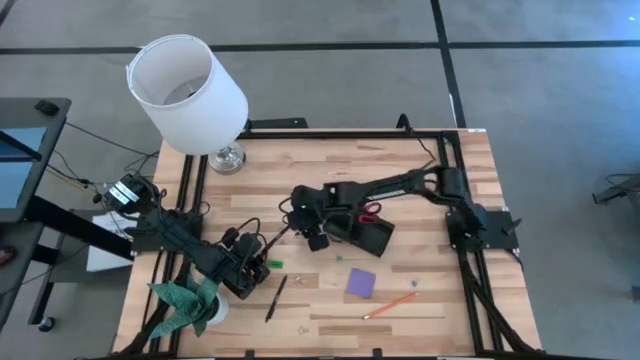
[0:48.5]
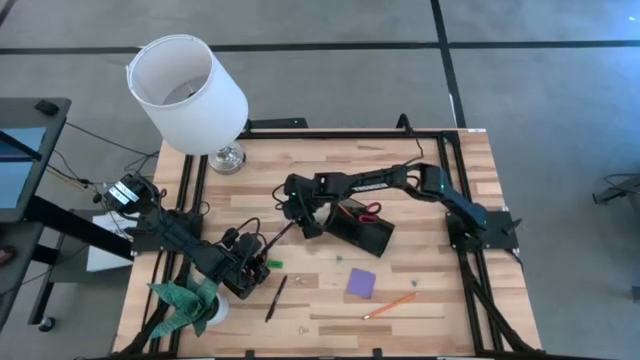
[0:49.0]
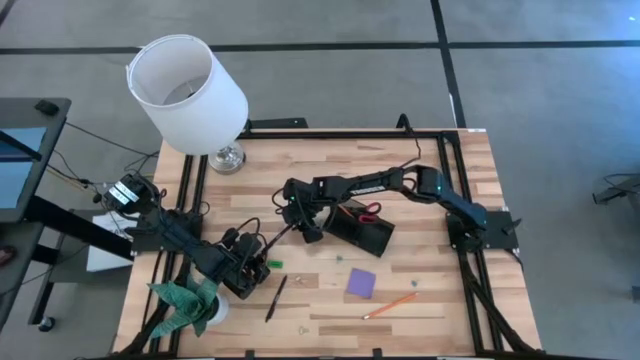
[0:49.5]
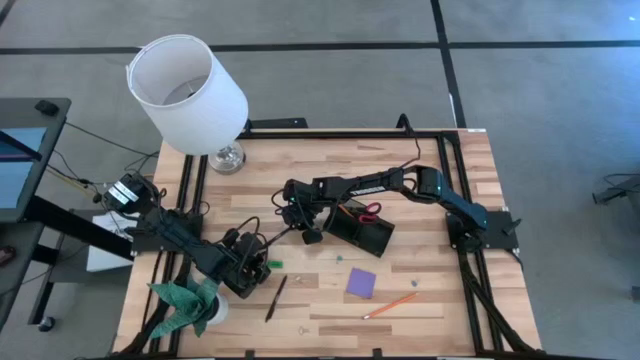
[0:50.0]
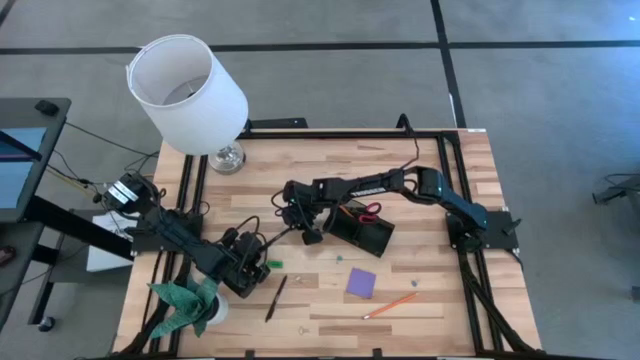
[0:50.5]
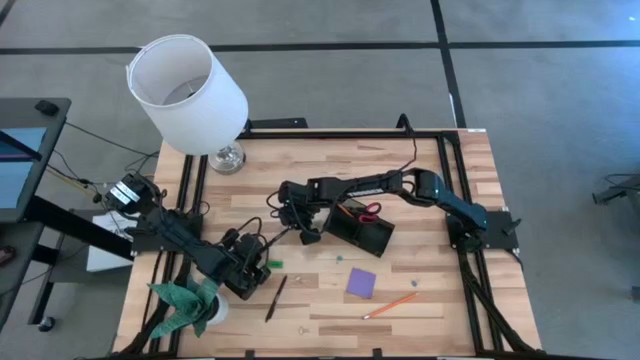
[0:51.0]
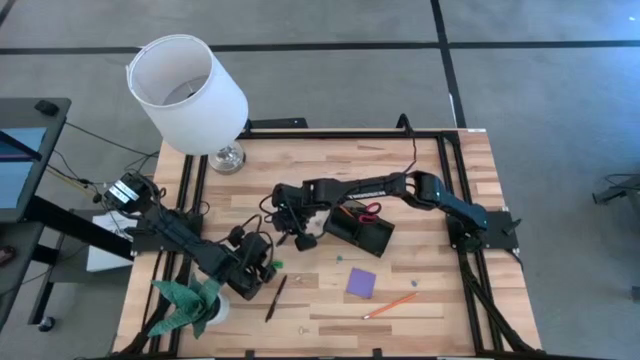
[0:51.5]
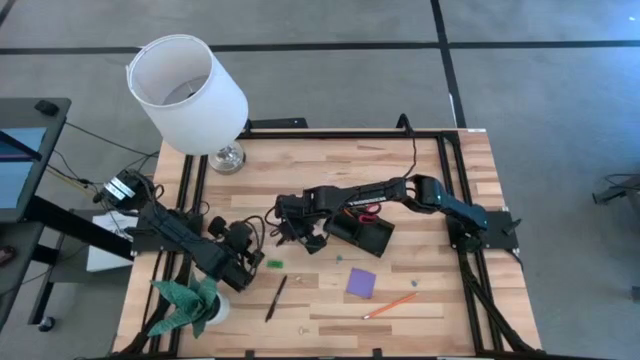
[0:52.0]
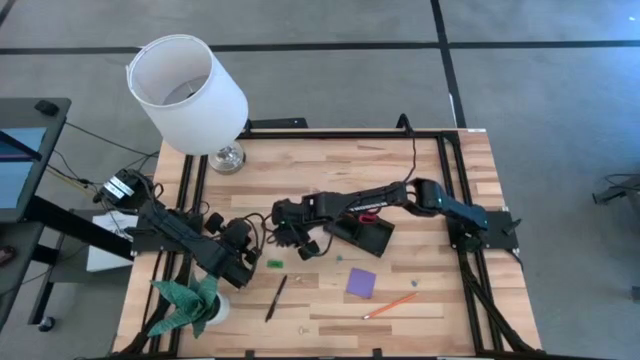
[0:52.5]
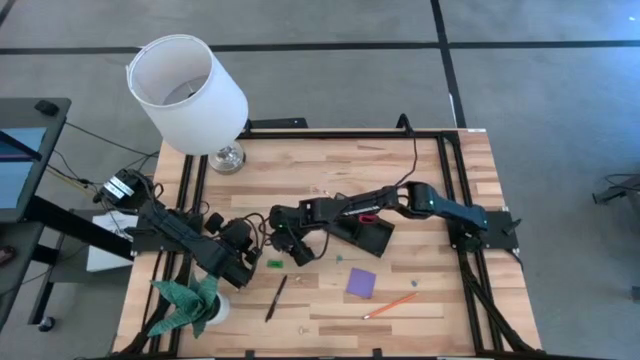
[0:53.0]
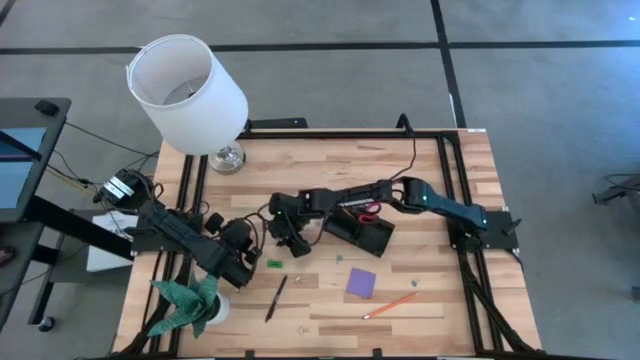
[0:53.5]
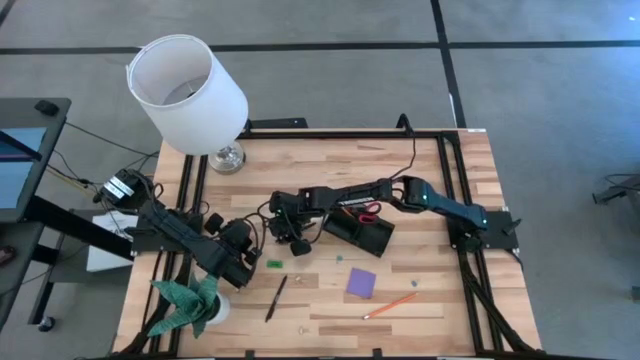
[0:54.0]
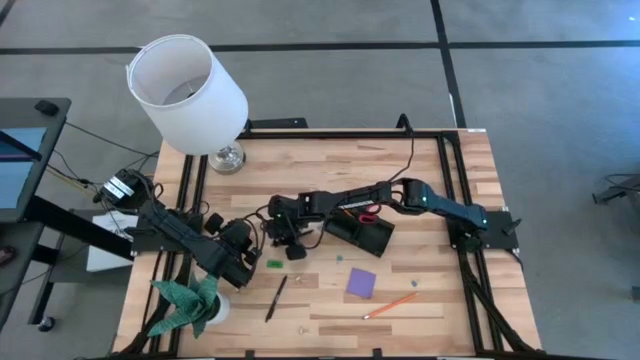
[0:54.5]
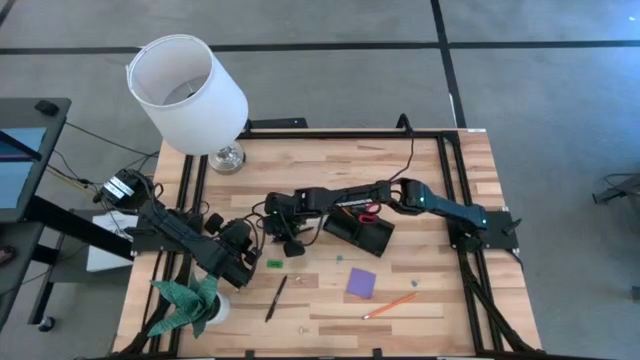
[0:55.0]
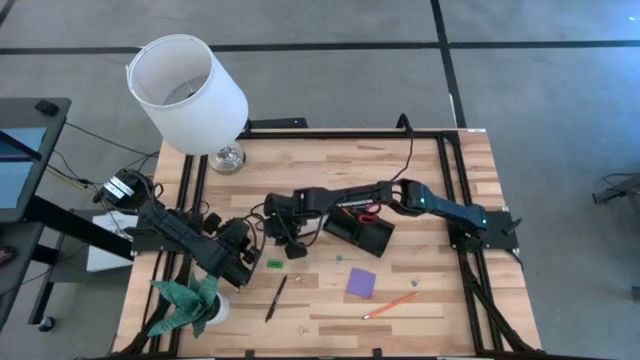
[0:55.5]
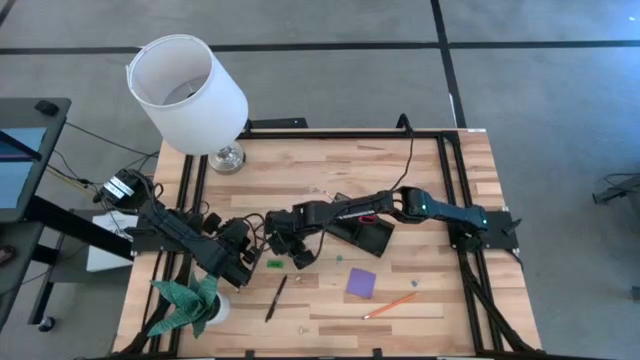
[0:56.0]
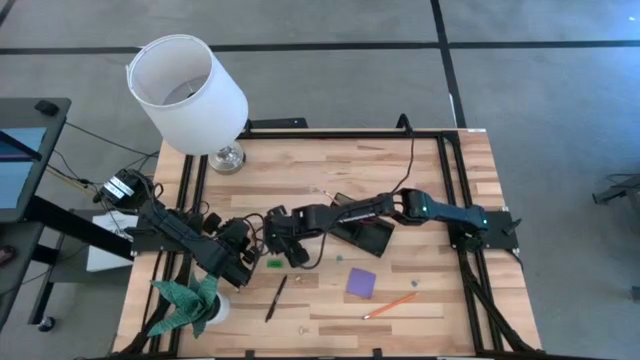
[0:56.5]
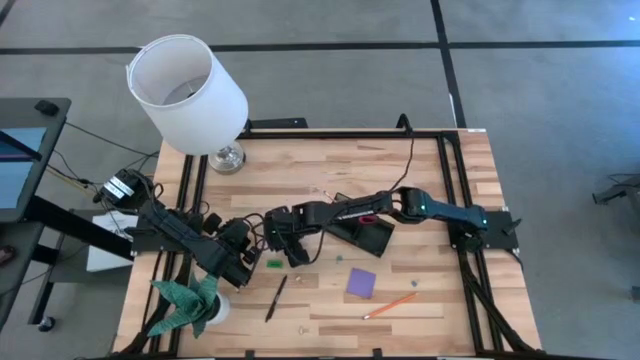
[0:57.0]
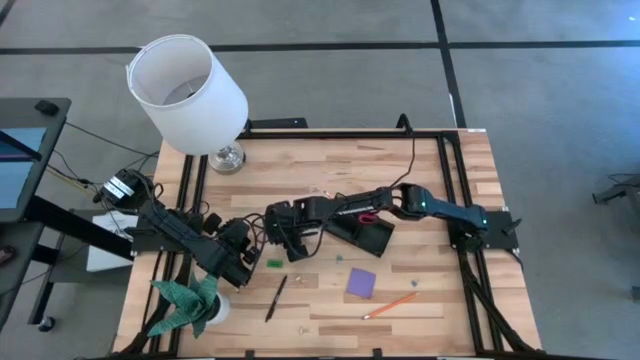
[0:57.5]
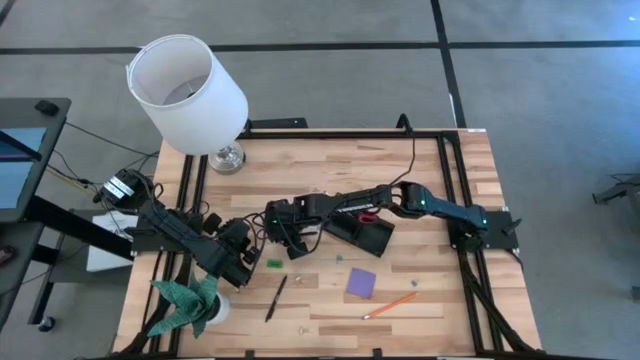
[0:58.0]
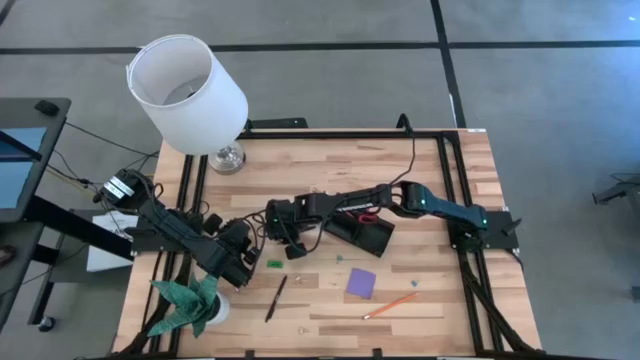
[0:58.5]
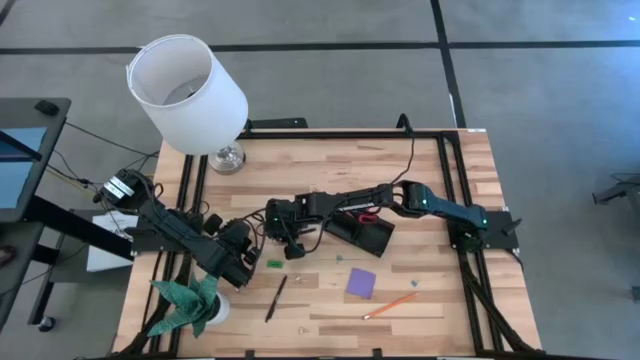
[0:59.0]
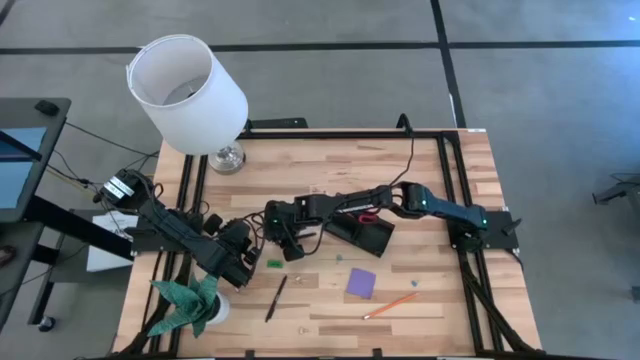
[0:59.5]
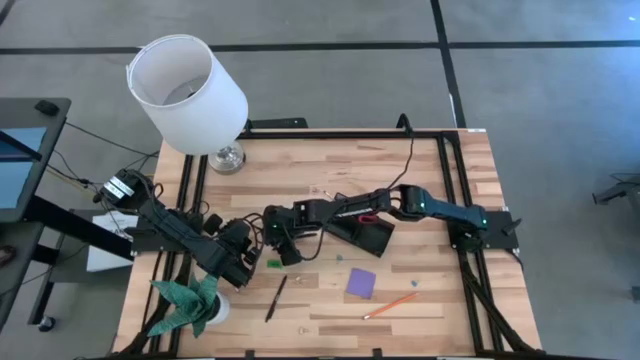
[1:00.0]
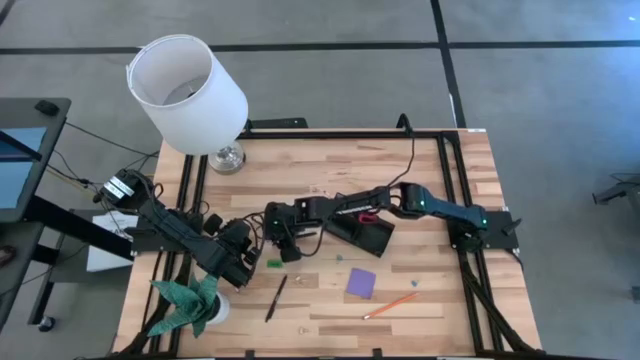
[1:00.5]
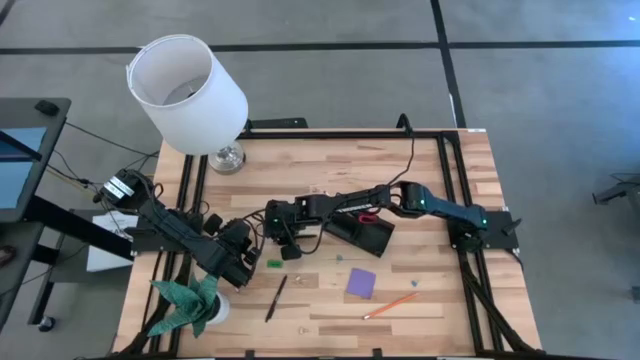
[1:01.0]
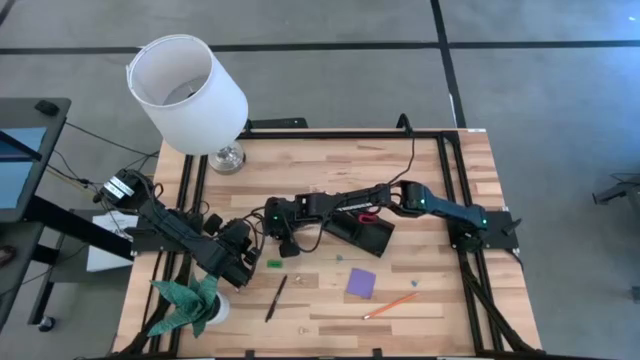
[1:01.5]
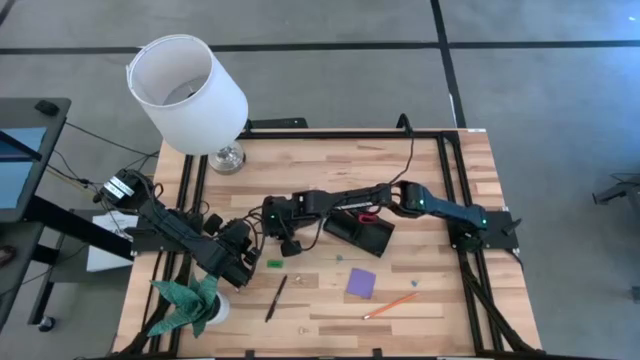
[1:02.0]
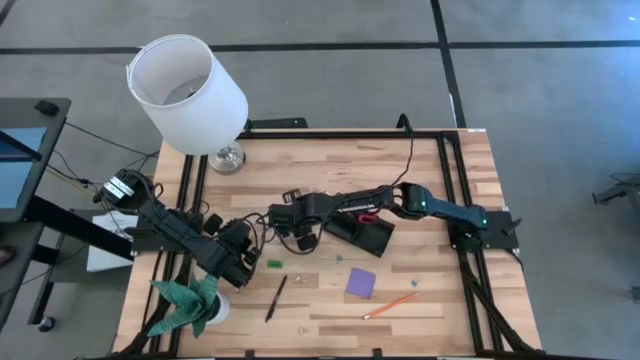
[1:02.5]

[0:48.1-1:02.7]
Task: Pick and place office supplies into organizer
Put the top black pen into the black desk organizer

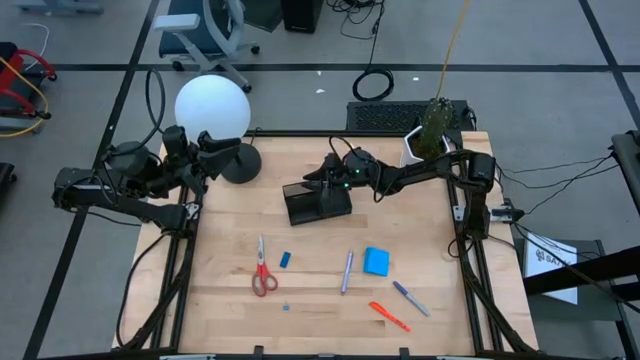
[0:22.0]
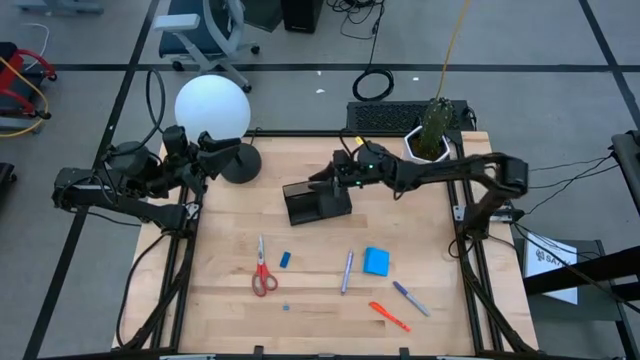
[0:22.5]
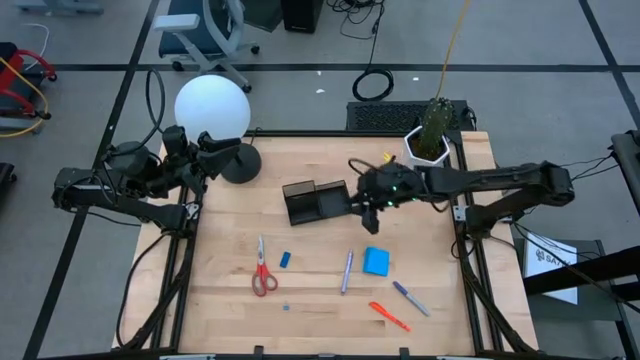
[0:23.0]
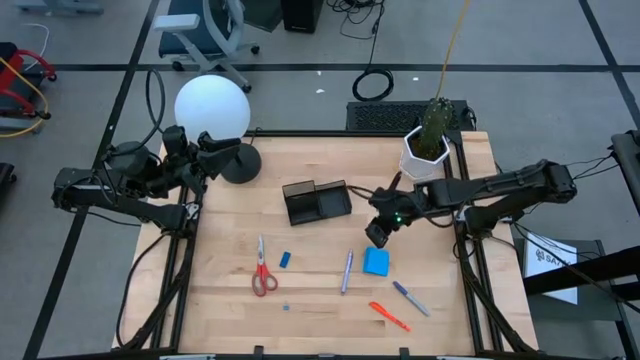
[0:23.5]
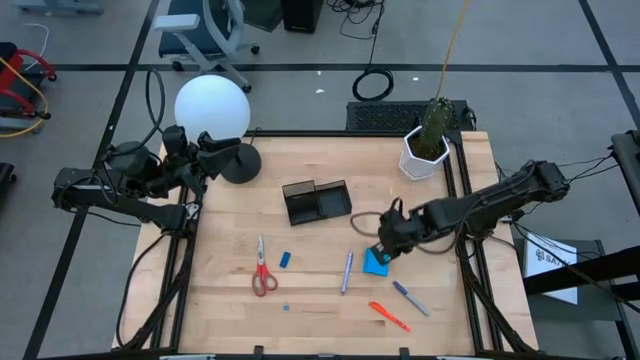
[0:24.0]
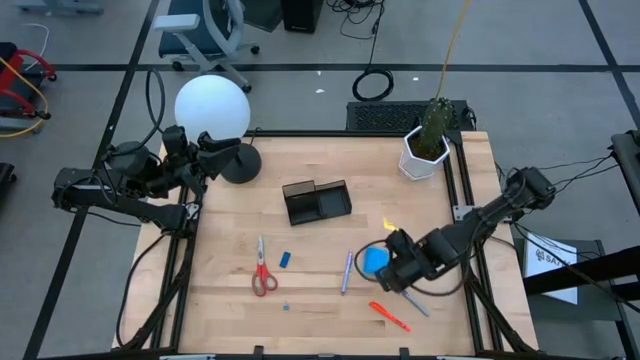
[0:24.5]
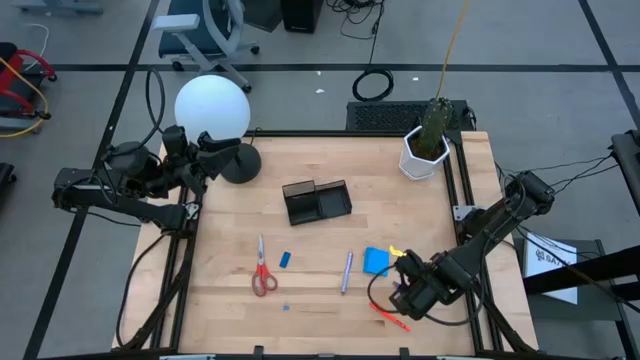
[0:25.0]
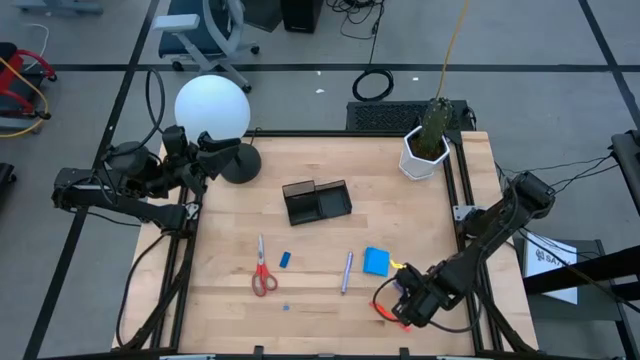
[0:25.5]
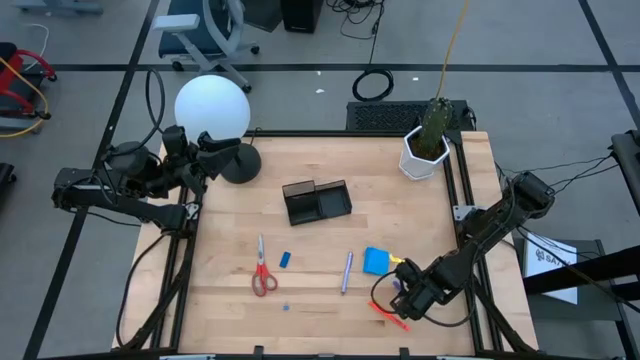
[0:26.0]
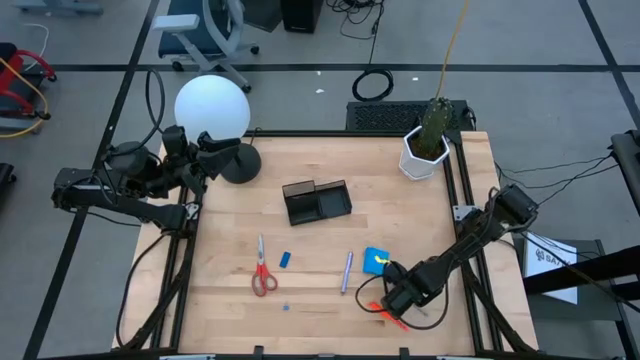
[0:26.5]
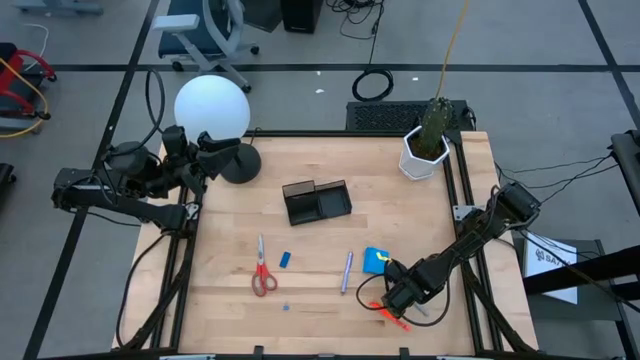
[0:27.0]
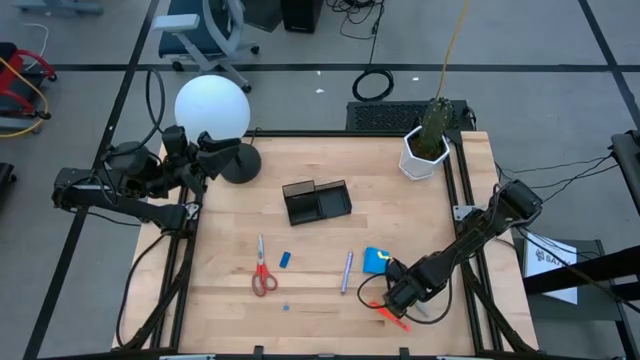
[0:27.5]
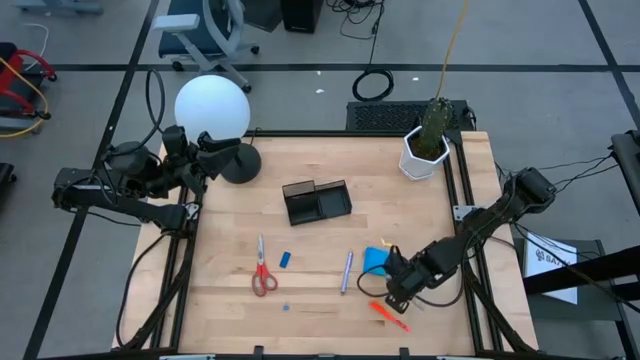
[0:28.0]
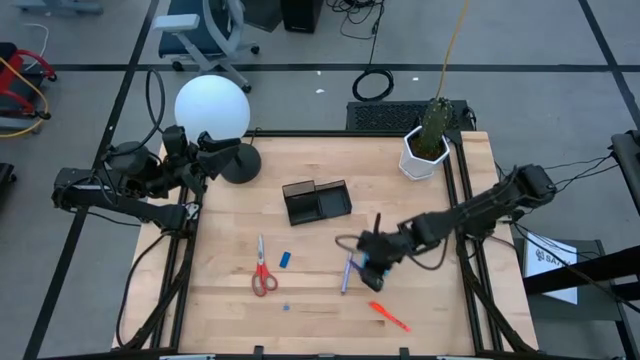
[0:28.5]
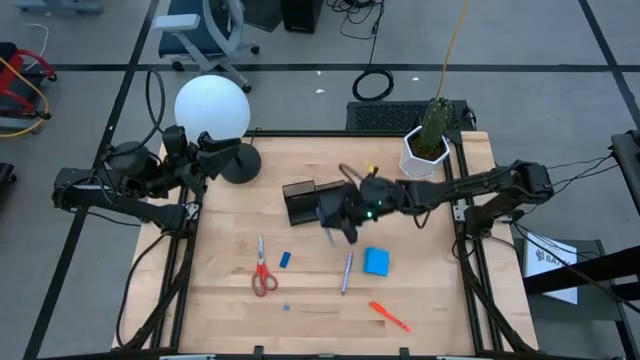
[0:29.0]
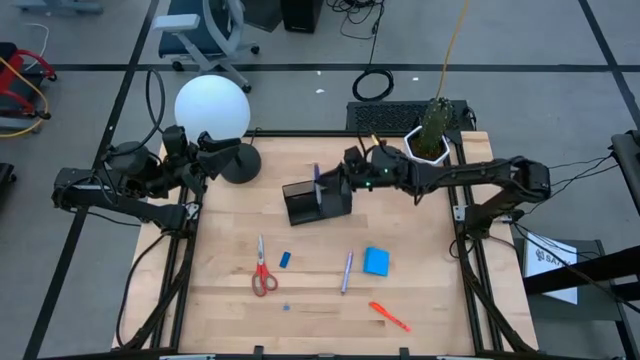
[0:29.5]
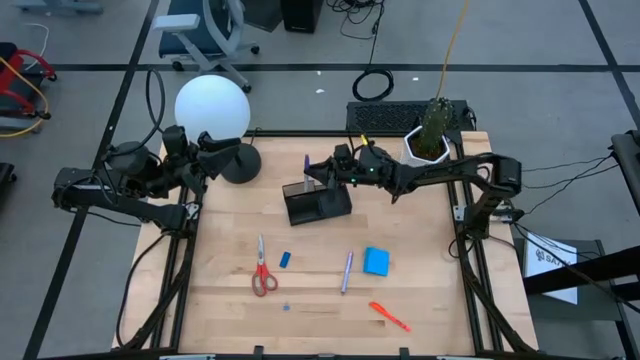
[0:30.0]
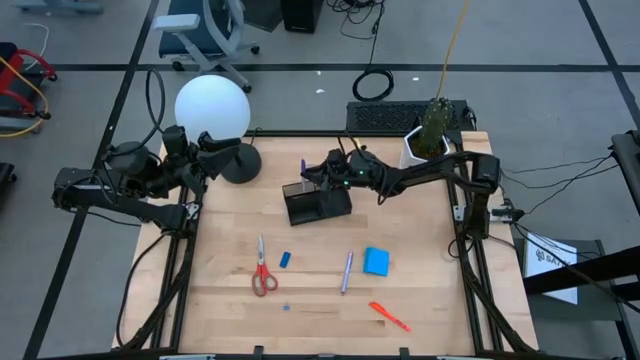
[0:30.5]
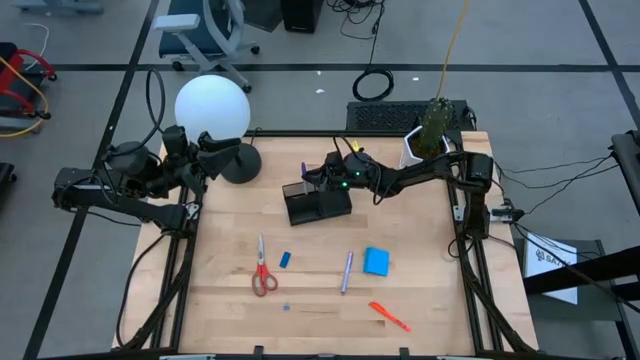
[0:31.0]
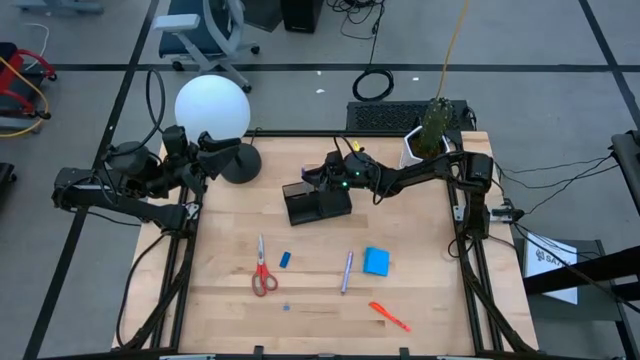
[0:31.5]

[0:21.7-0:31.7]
Task: Pick and place office supplies into organizer
Put the violet marker pen into the black desk organizer
